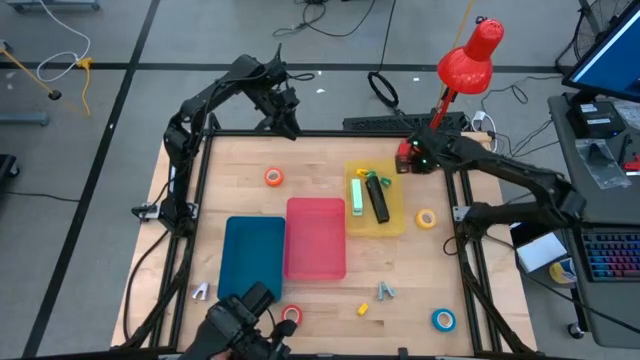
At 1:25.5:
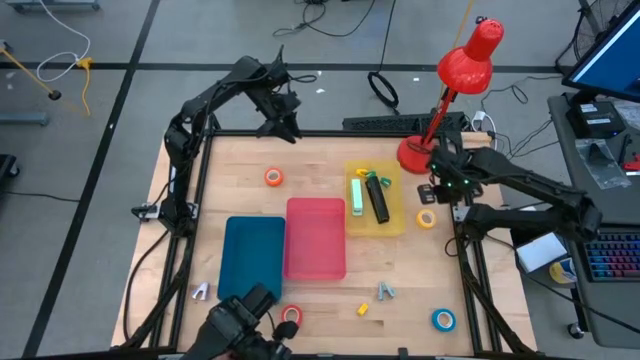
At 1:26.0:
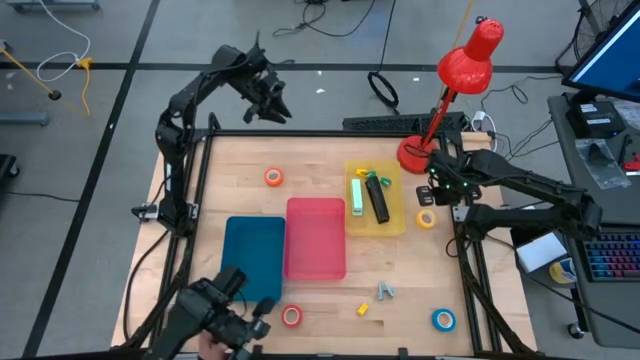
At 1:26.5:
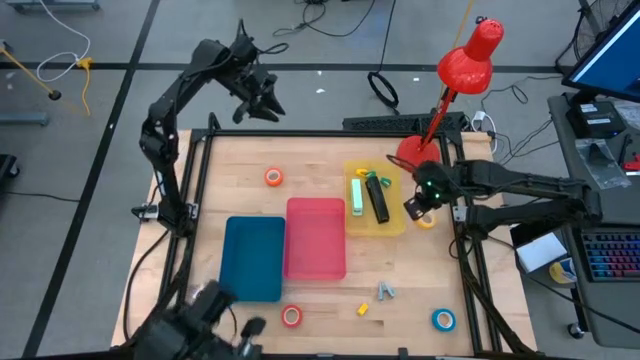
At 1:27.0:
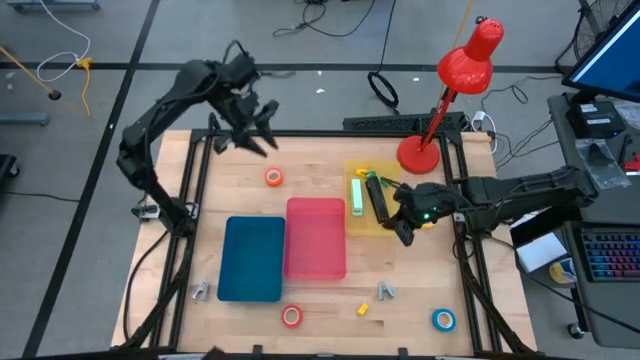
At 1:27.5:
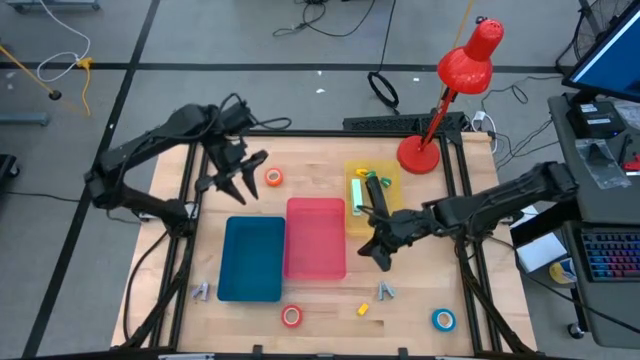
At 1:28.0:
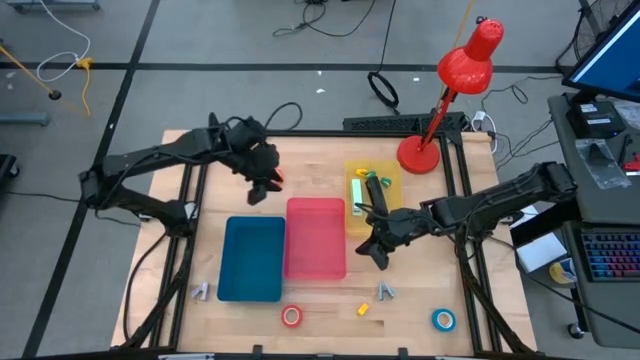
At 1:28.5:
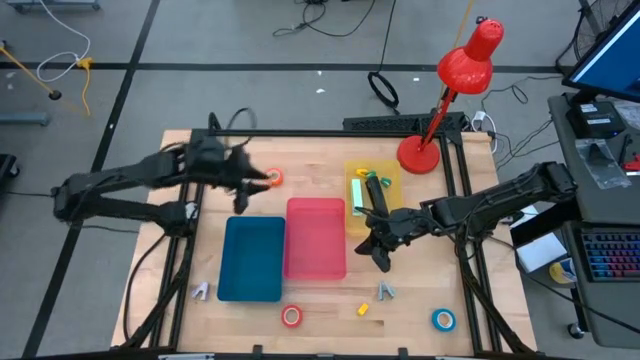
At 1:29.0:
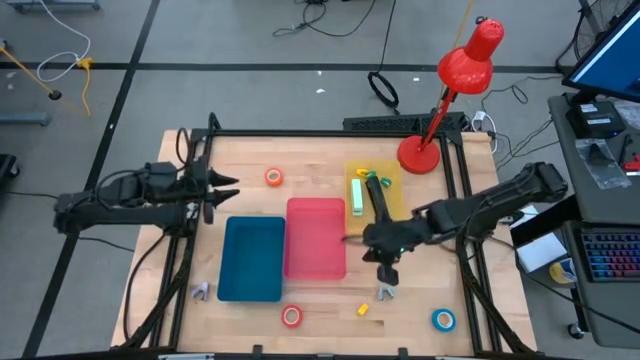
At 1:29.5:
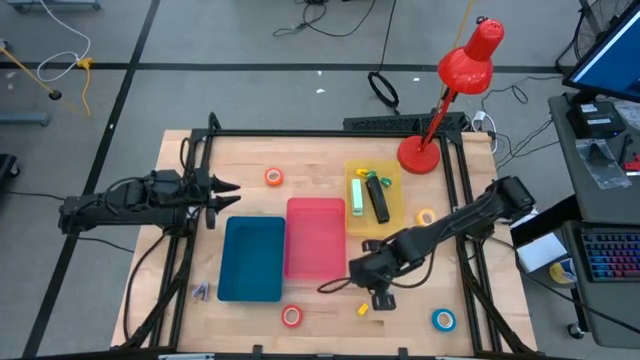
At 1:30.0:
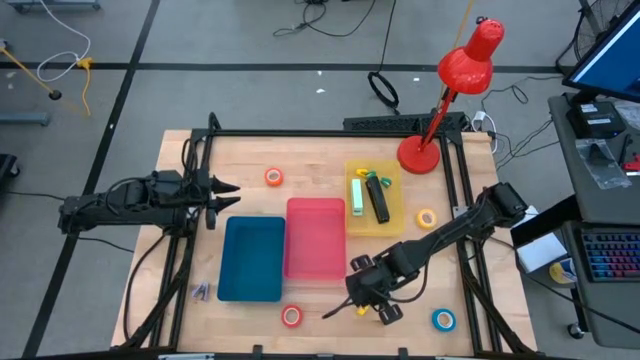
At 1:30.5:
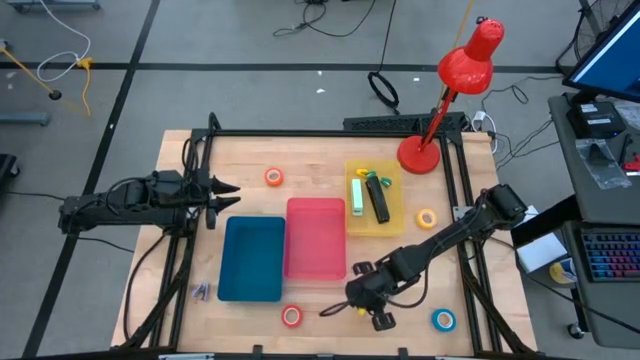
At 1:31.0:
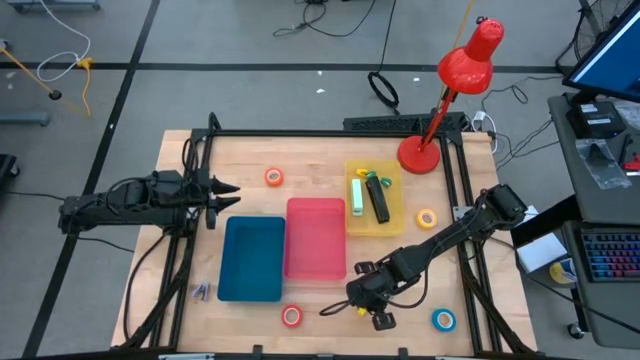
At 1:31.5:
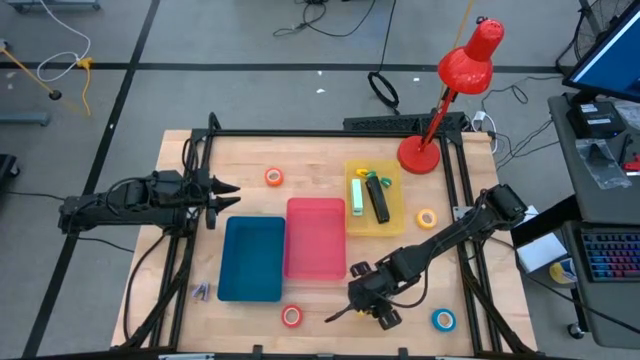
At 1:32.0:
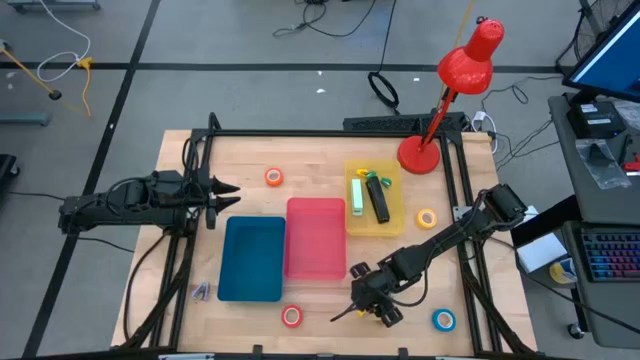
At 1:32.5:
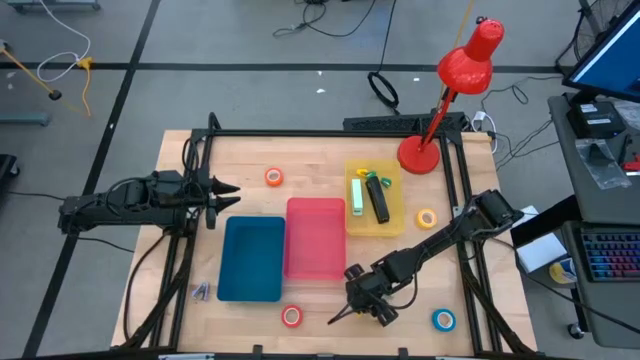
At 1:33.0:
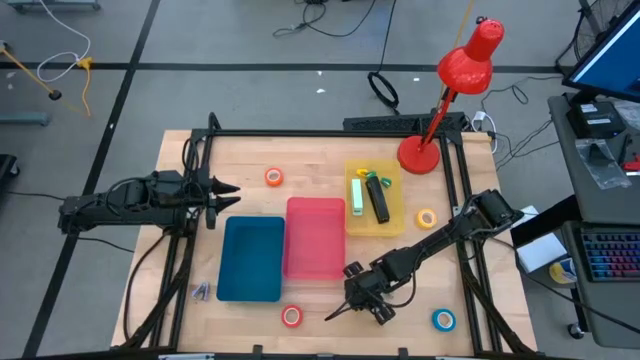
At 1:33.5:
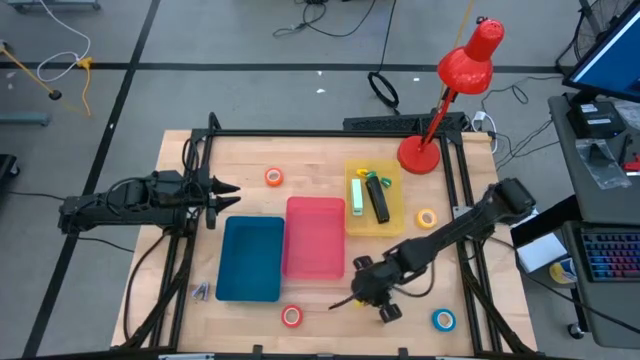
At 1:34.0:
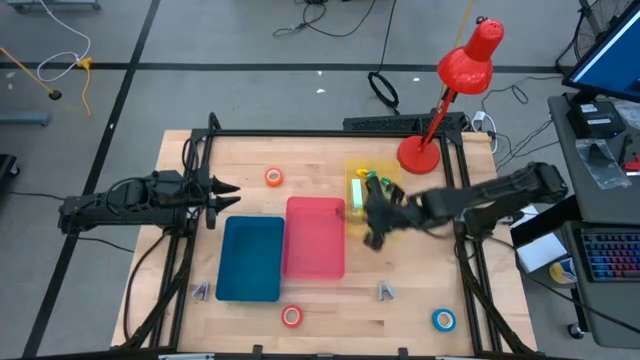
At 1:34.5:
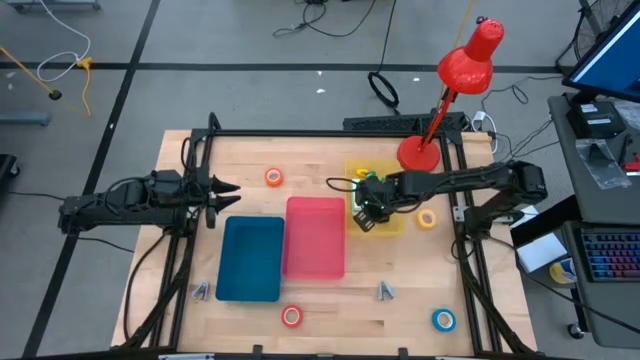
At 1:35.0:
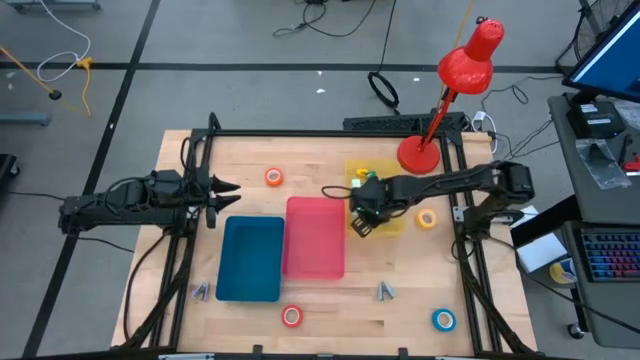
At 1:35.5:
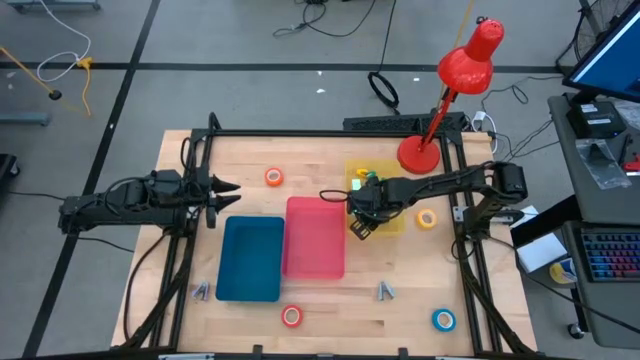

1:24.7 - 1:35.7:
Task: Pick and place Stapler, Stapler remover, tape
Put the yellow stapler into the yellow bin

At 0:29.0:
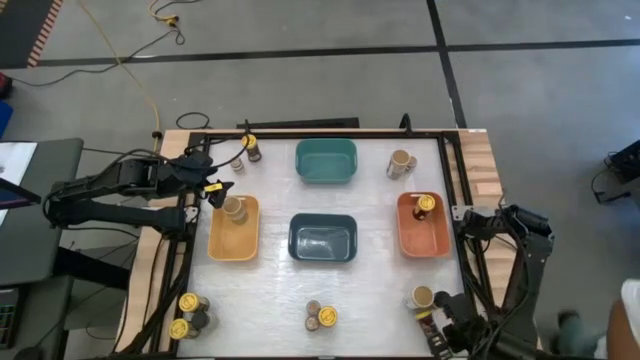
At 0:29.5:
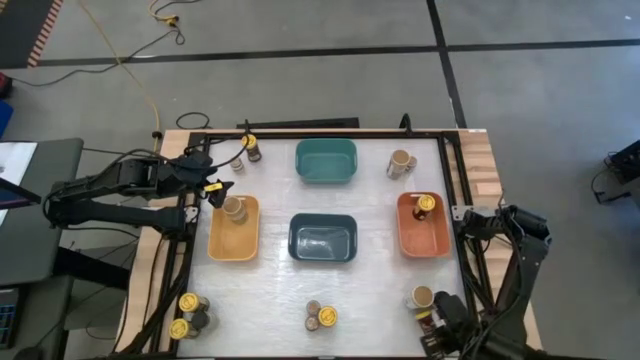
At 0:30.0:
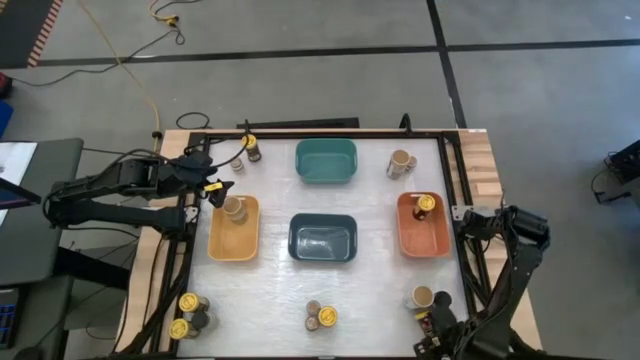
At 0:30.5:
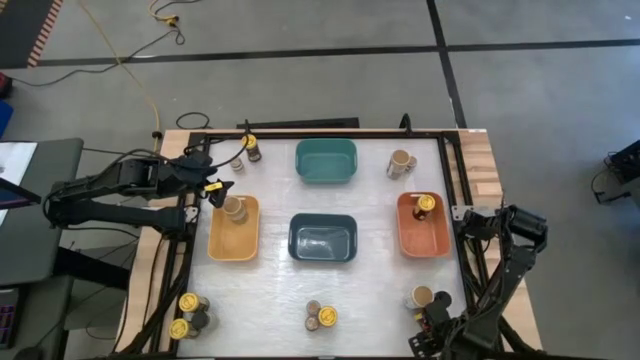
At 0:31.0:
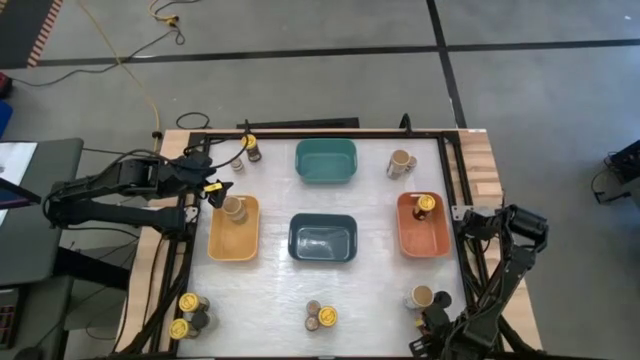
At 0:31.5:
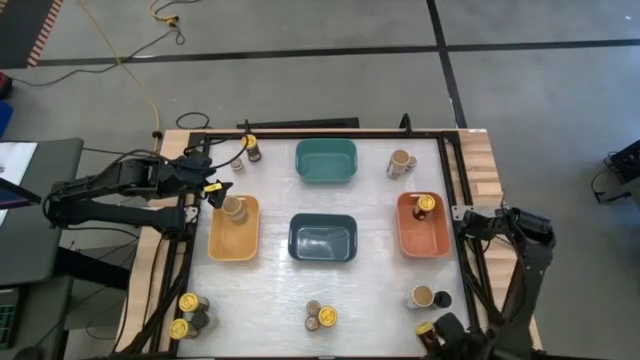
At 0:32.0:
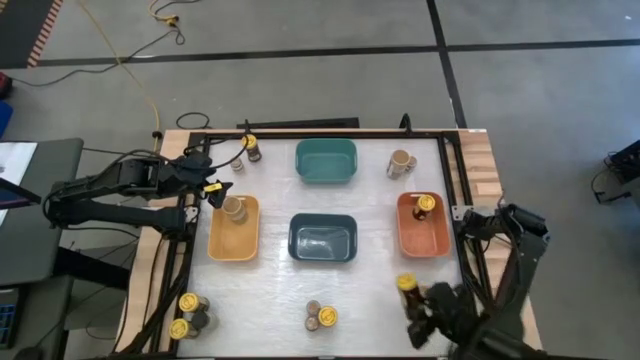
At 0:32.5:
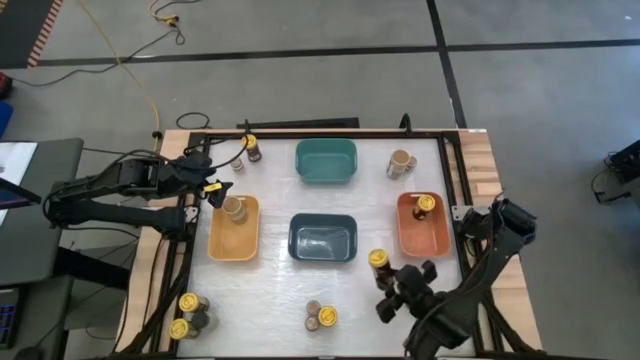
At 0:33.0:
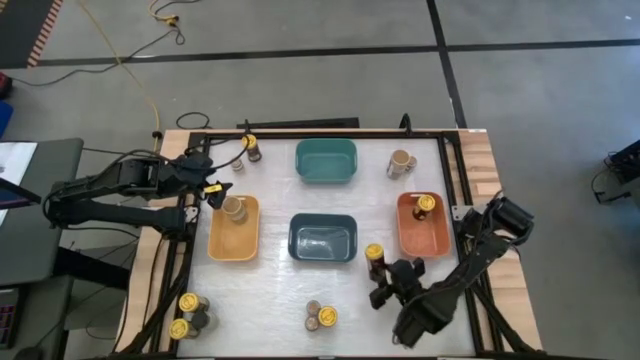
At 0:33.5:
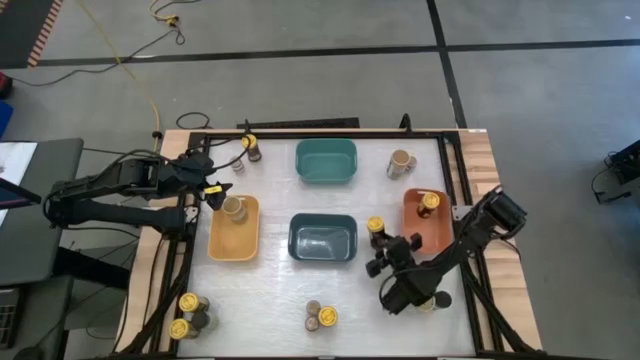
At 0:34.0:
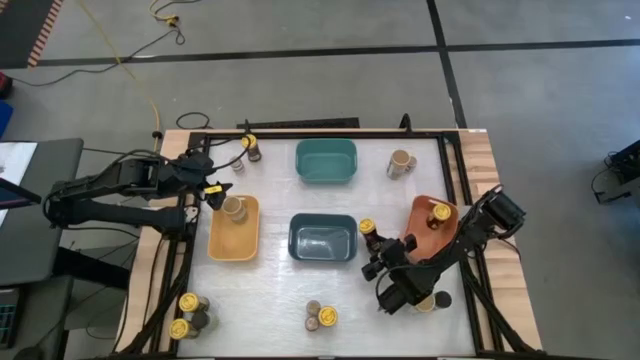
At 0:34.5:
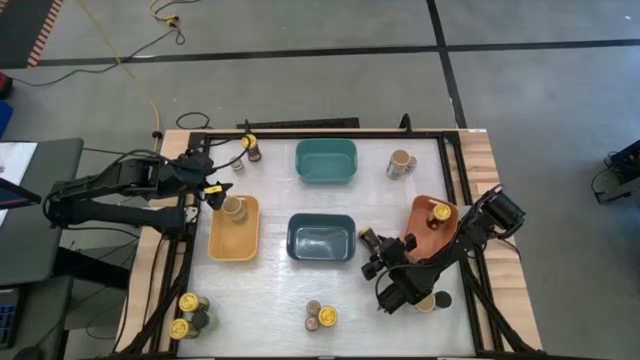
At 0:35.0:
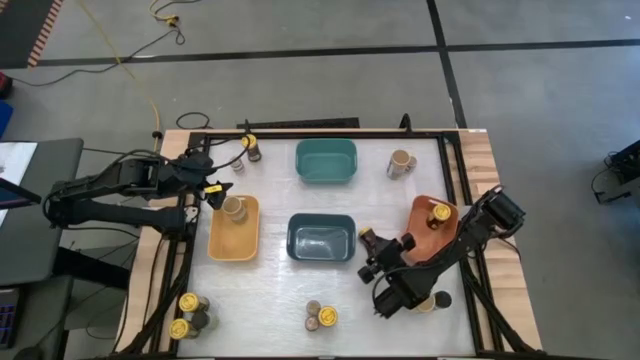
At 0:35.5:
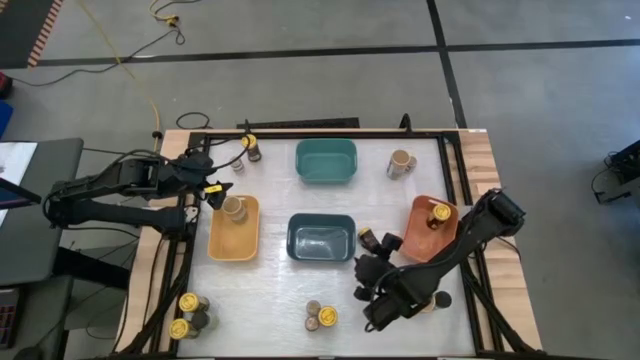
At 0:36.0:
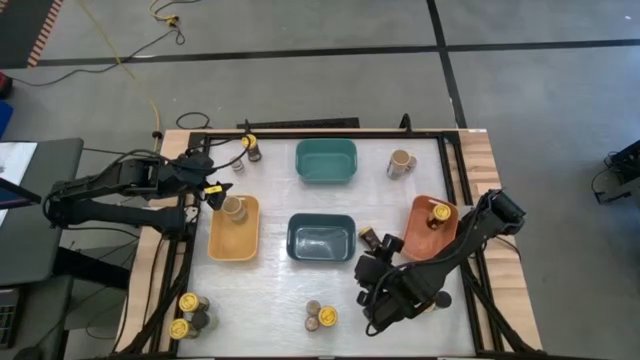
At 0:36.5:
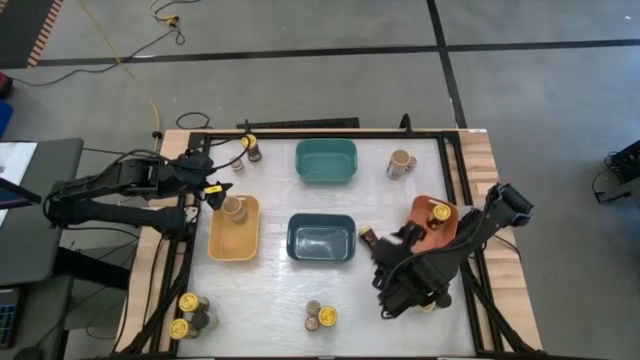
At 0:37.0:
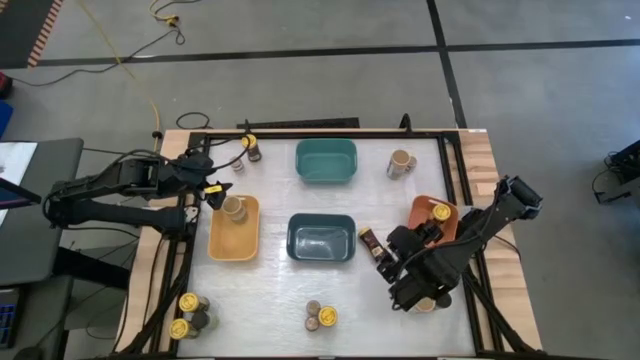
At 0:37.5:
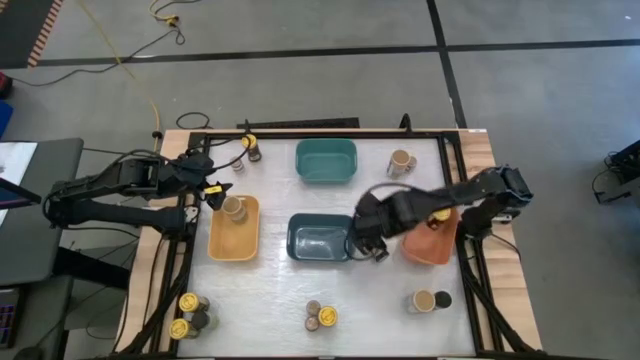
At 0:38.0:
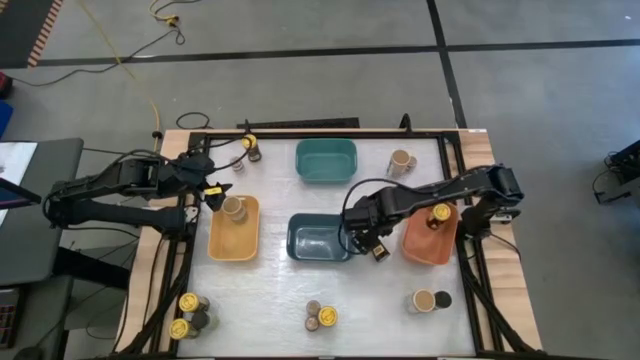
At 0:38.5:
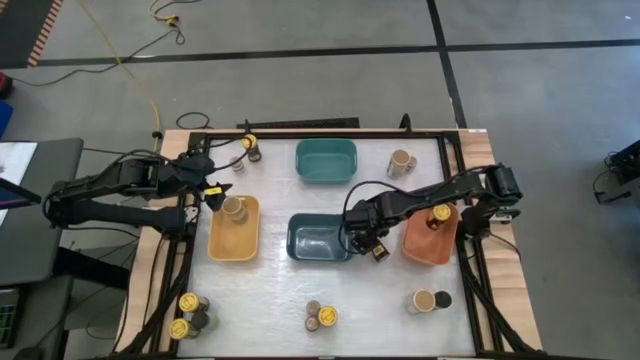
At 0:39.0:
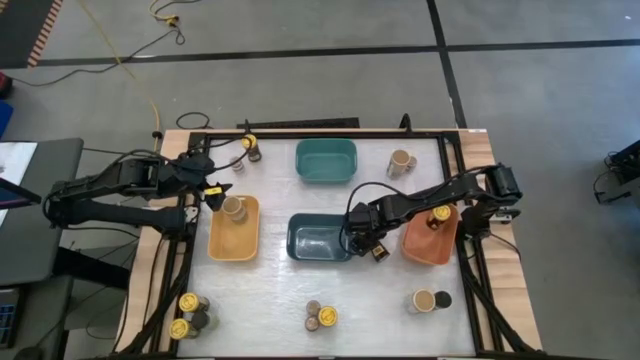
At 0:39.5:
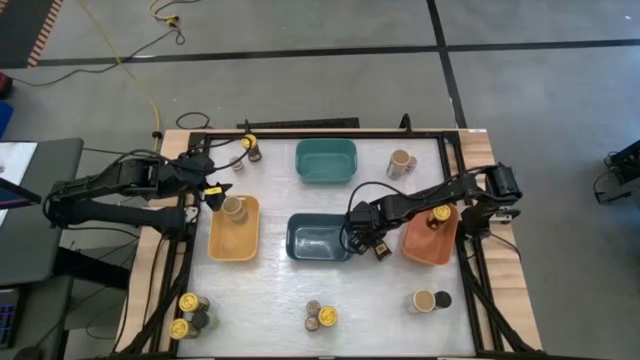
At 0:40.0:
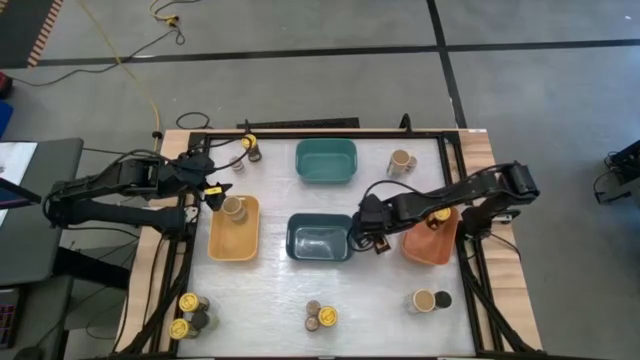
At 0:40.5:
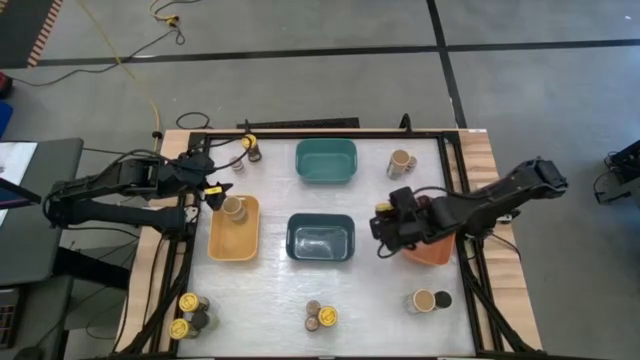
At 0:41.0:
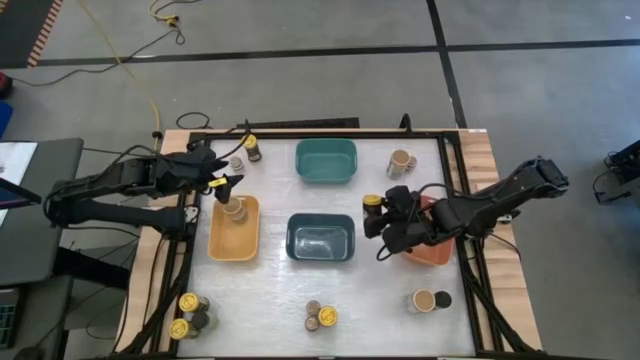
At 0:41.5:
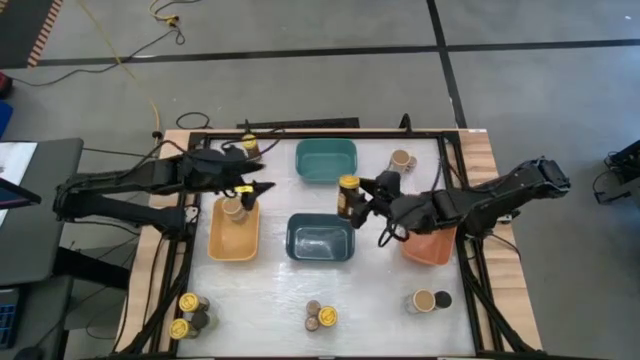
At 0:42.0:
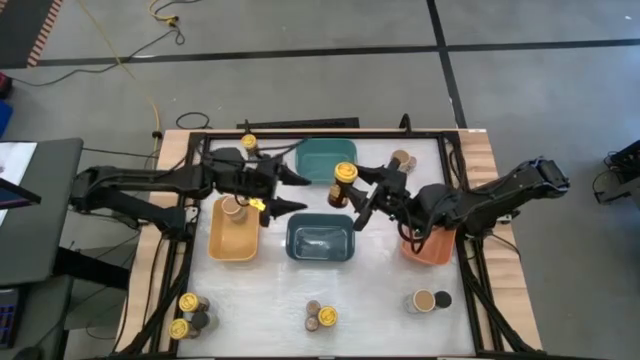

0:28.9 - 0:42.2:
Task: Sort spices by type
Put the yellow seasoning bottle into the orange bin
